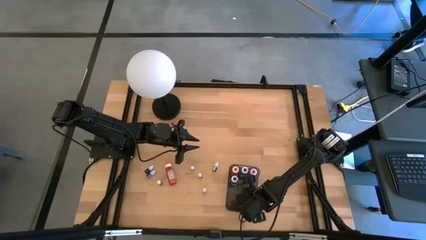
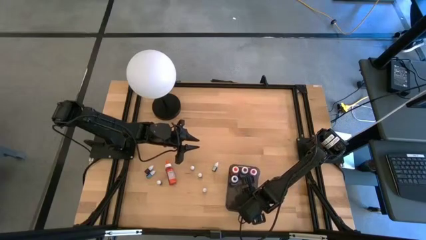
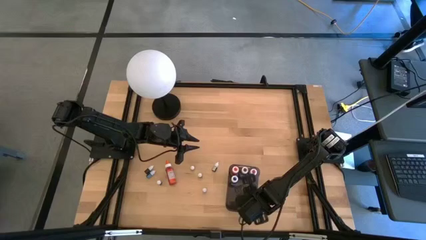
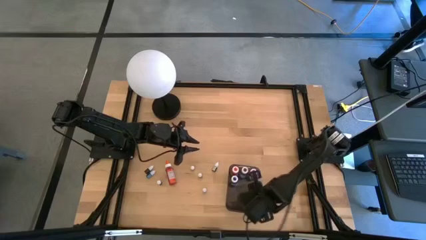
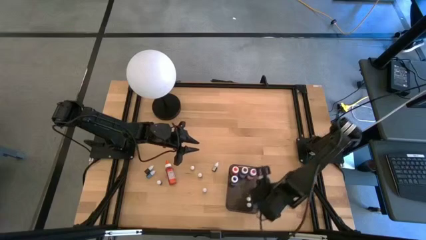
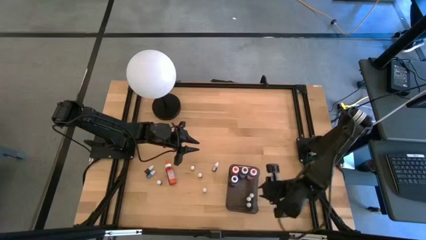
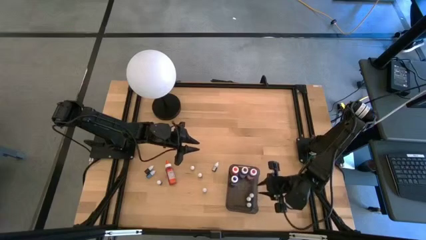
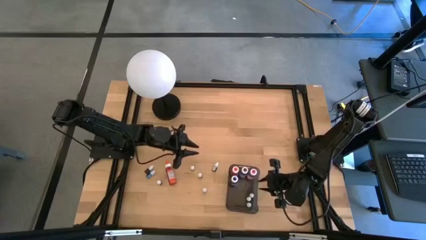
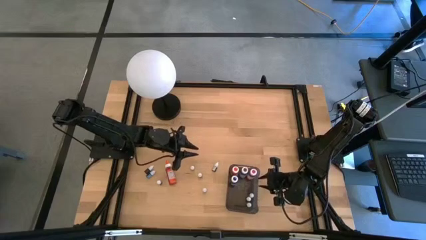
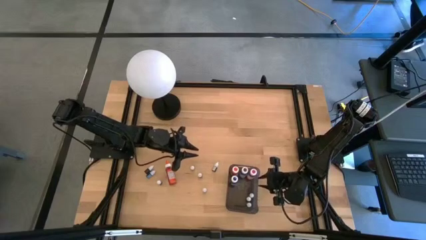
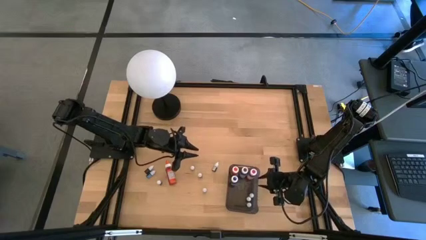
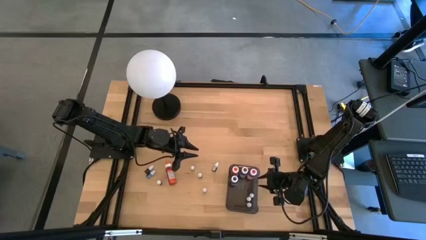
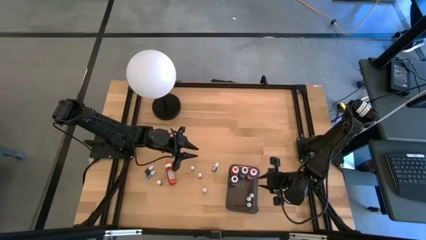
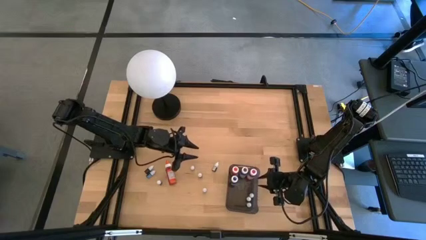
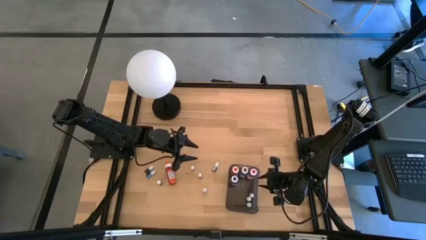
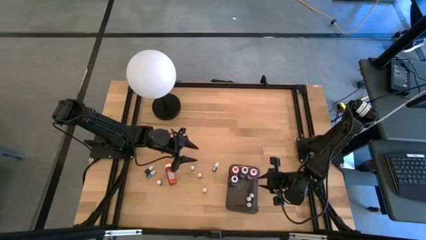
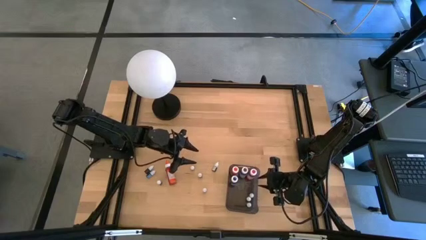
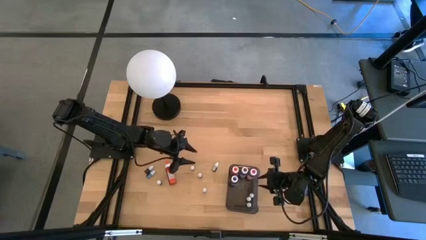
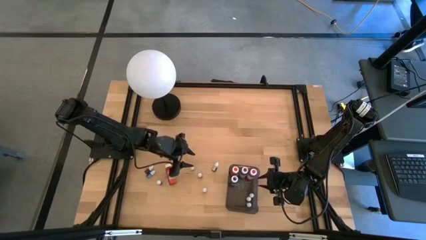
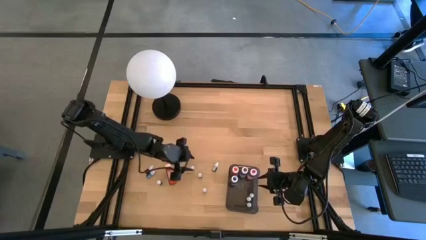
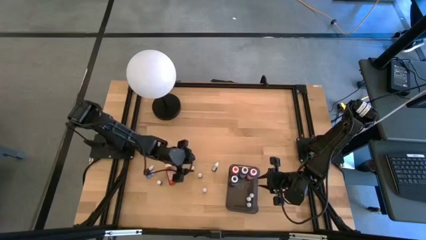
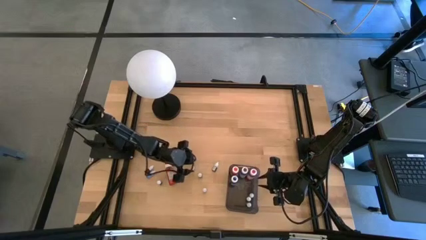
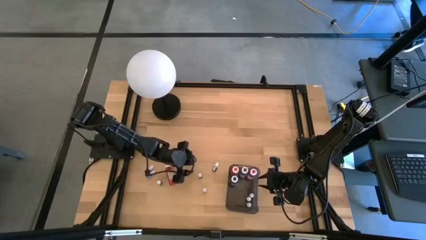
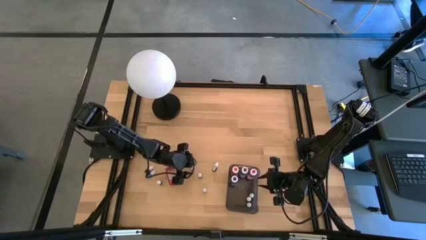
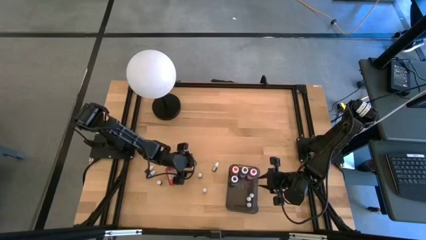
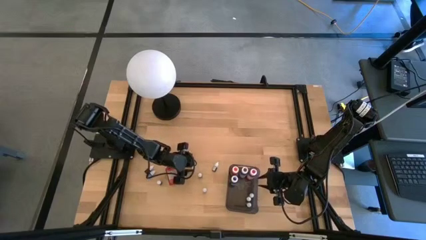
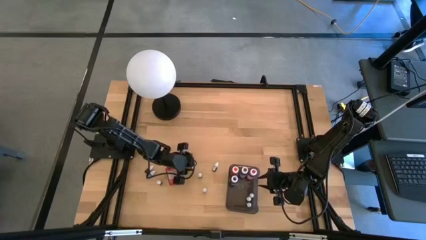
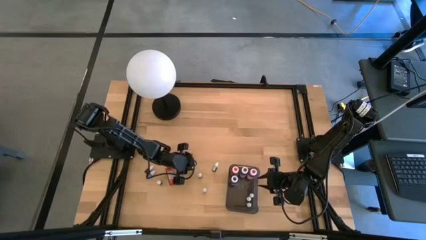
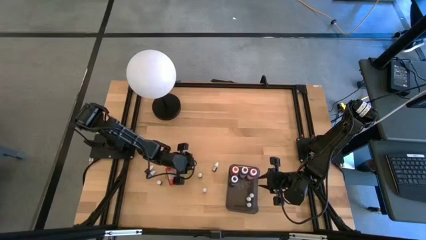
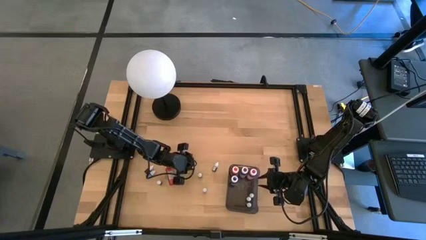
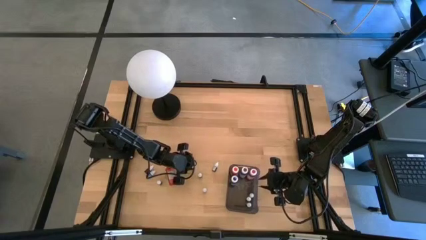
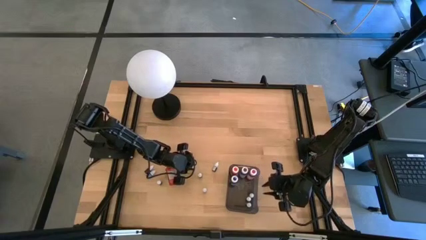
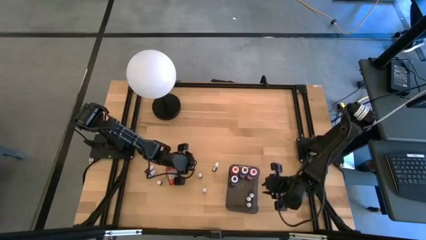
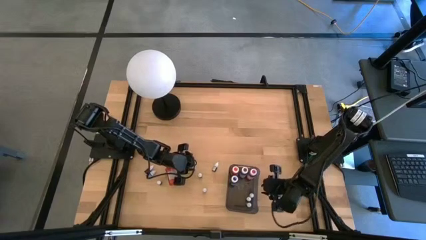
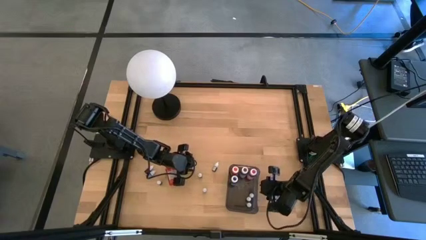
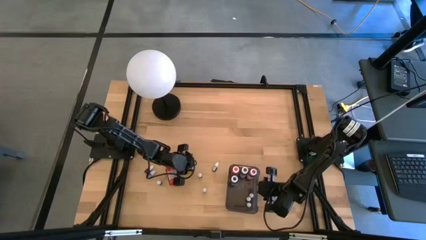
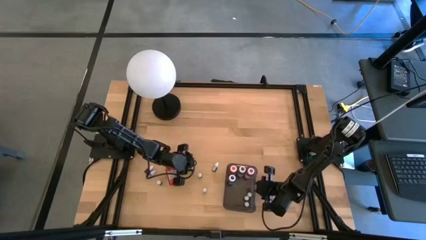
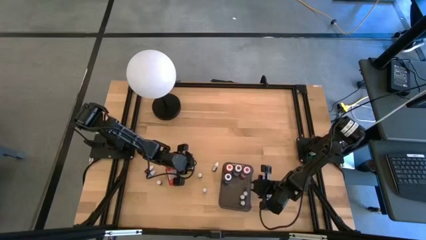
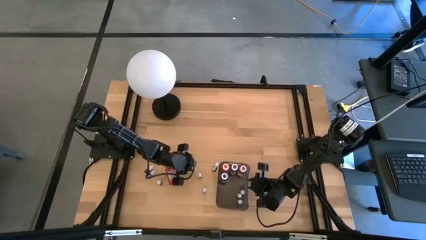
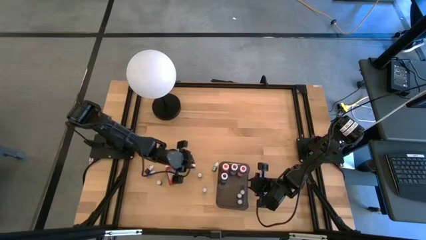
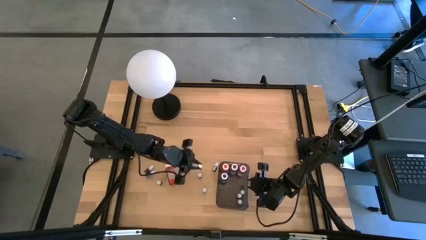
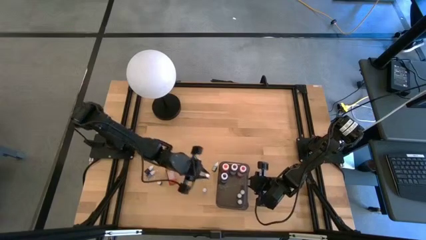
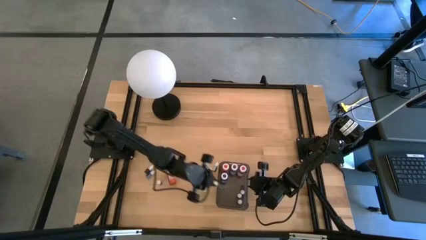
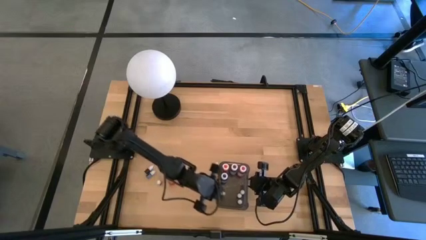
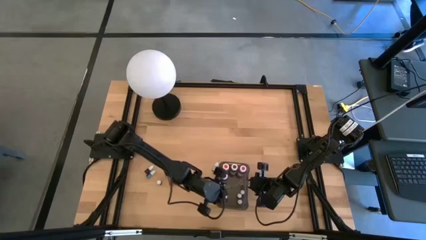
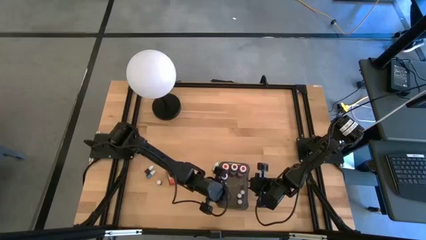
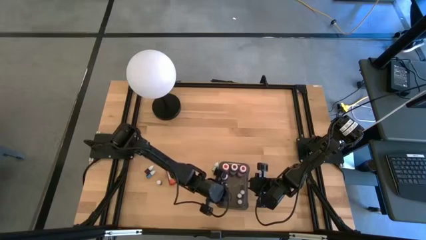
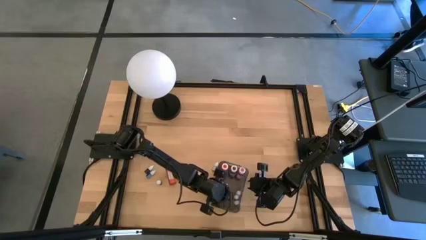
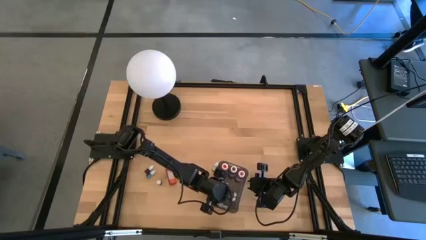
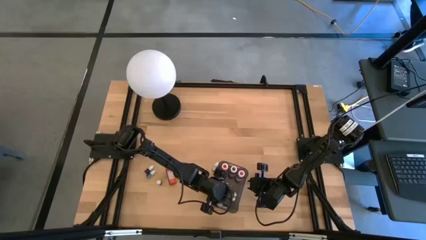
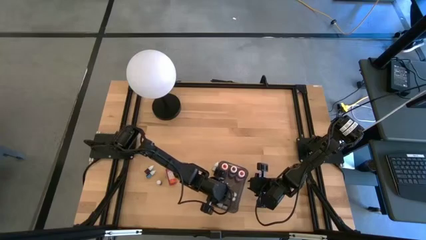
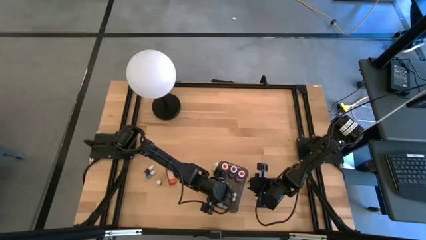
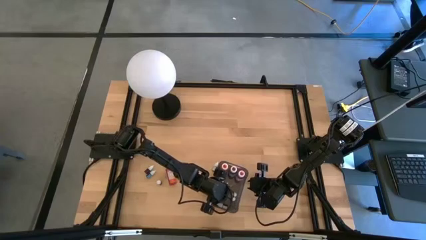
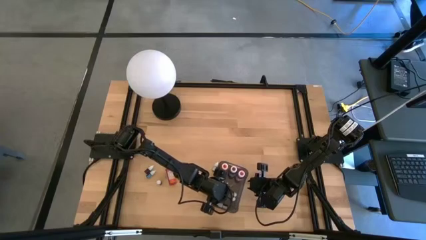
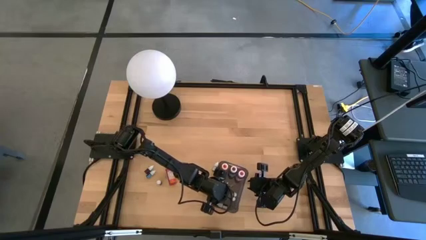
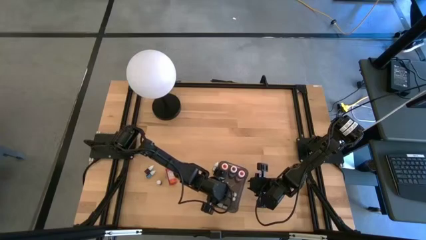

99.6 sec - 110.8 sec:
Task: Pick & Place food coloring
Put the small food coloring bottle into the black bin

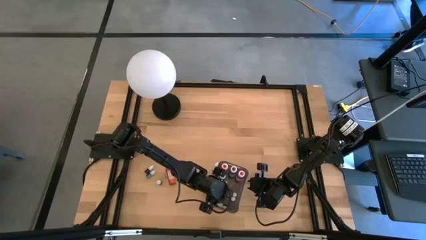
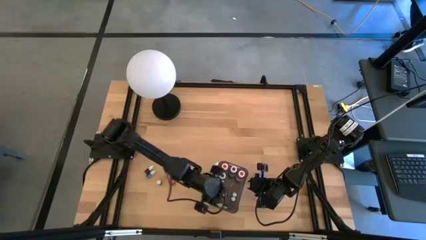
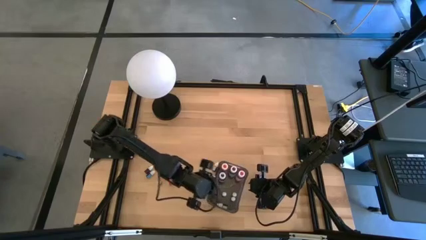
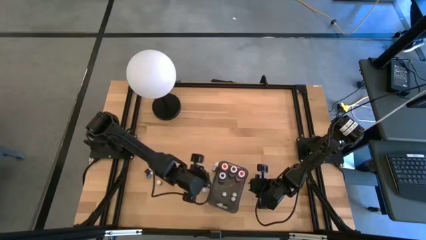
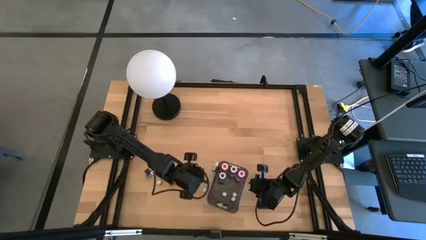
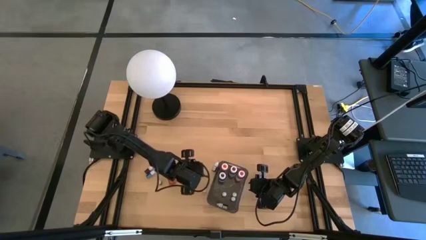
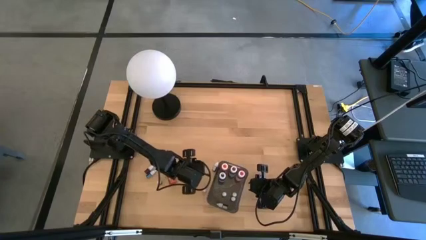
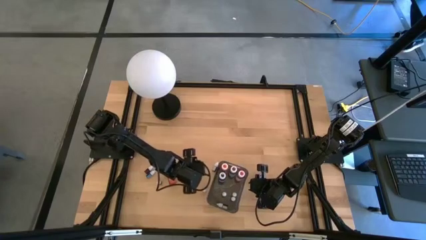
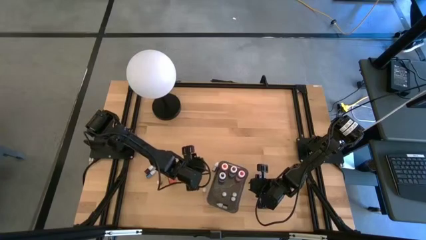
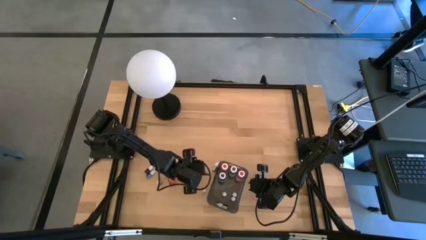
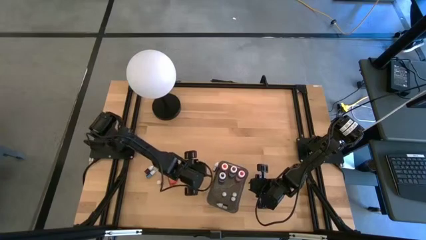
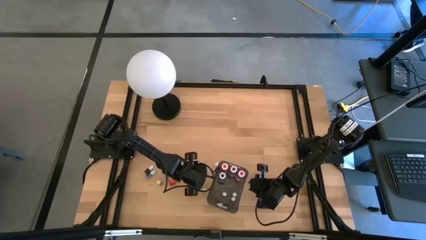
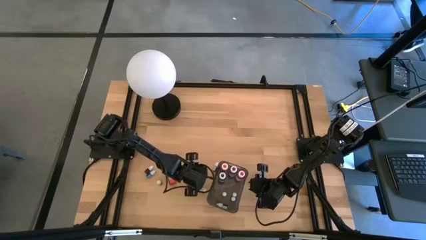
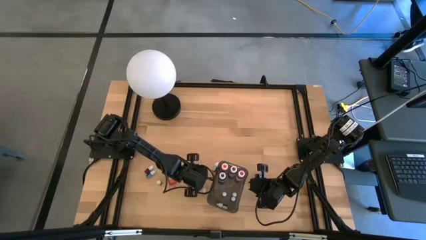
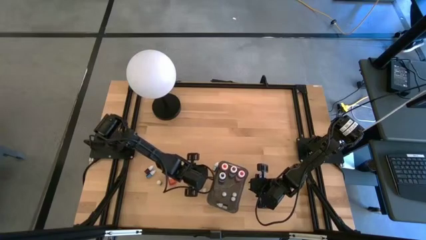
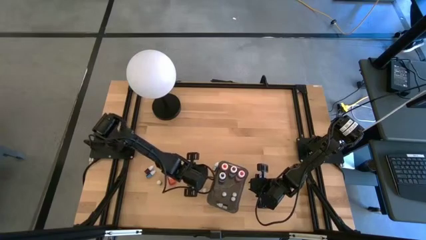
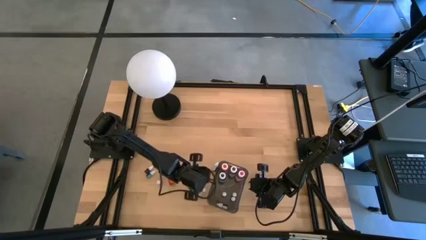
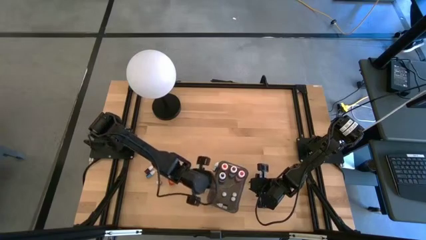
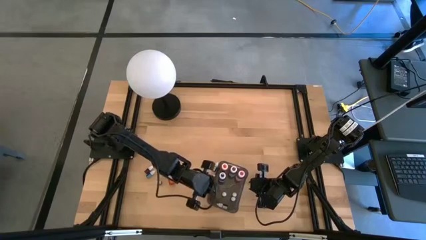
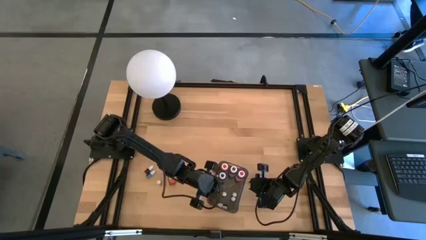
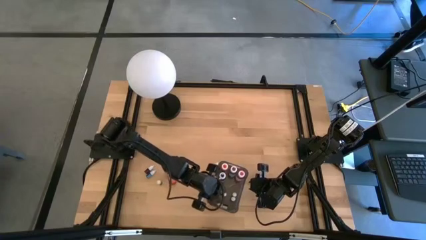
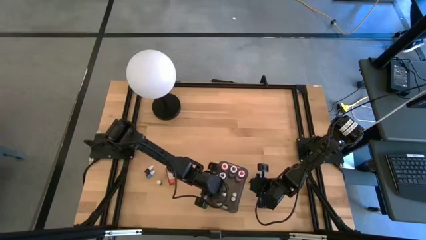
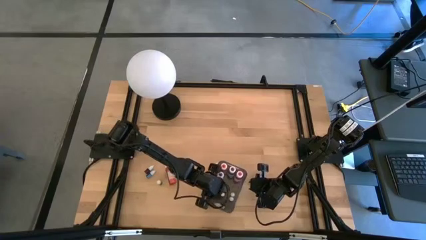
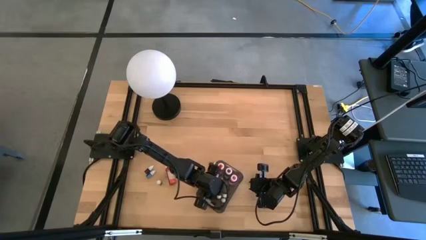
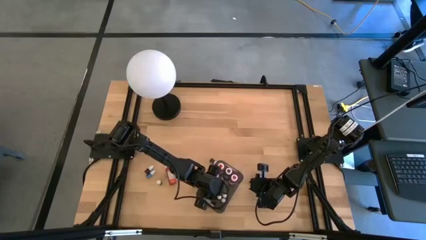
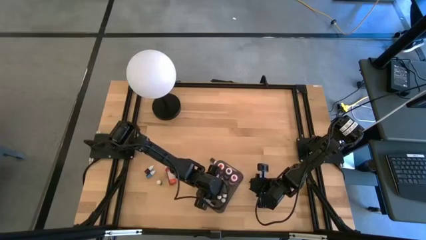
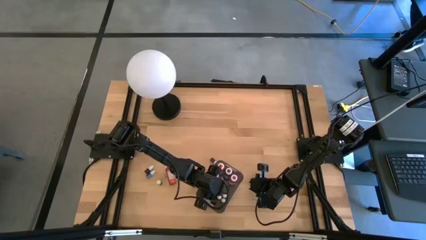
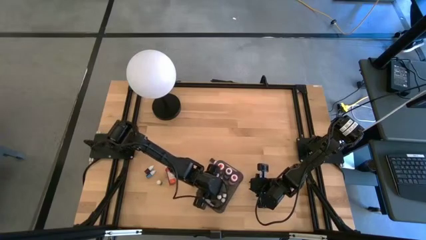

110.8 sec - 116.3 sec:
Put the small food coloring bottle into the black bin
